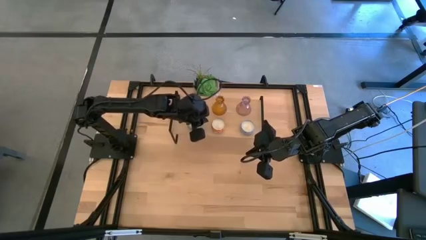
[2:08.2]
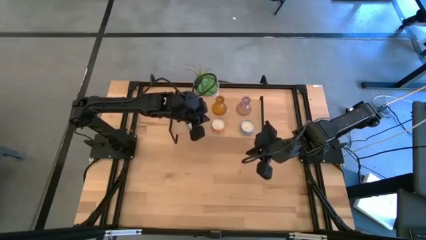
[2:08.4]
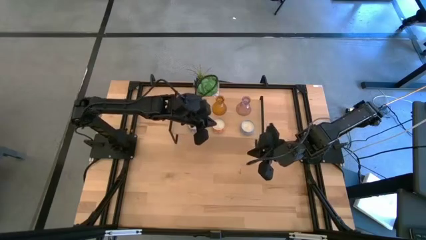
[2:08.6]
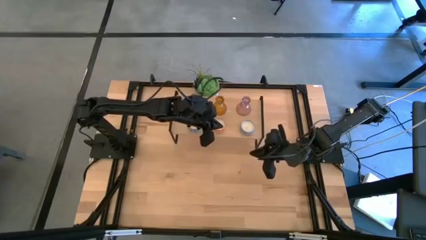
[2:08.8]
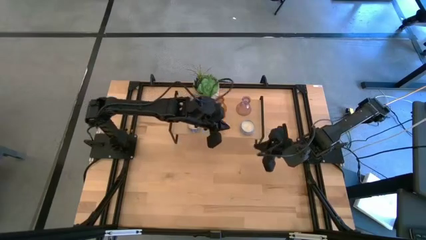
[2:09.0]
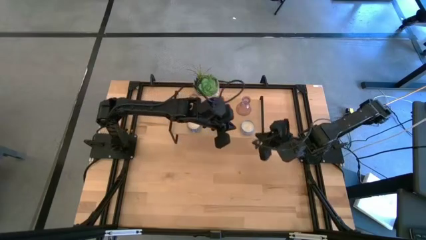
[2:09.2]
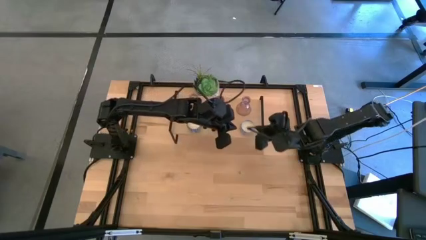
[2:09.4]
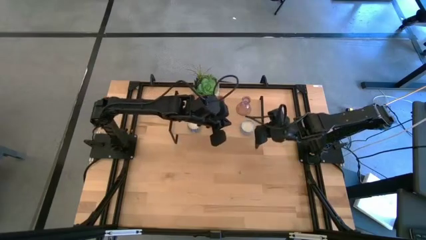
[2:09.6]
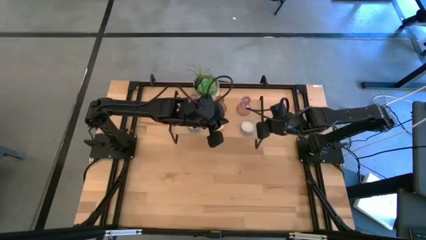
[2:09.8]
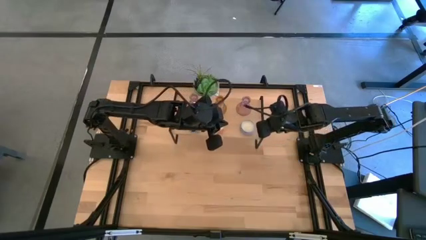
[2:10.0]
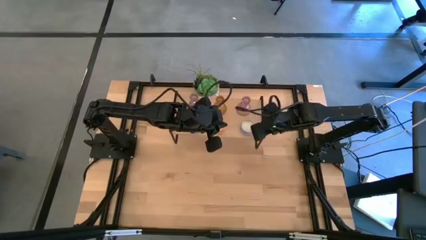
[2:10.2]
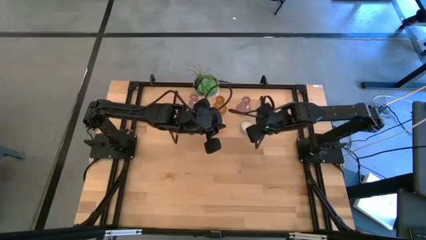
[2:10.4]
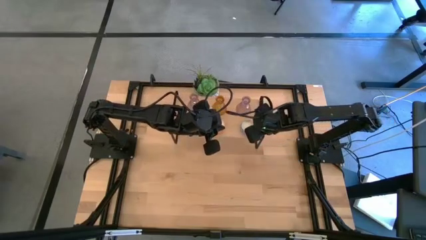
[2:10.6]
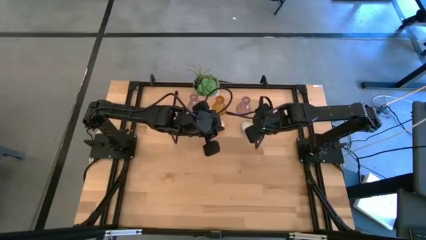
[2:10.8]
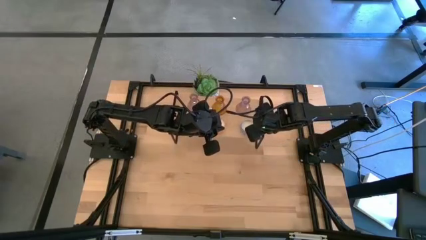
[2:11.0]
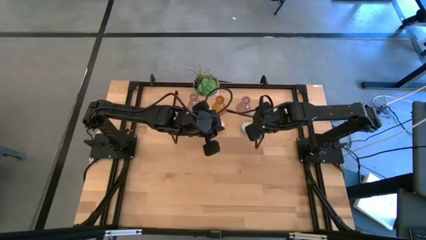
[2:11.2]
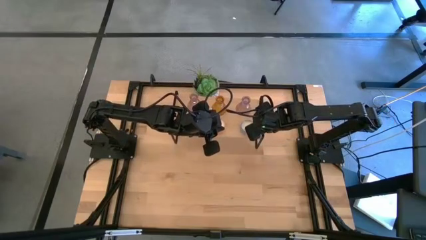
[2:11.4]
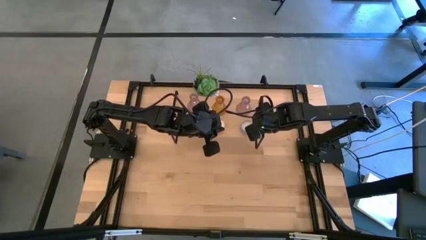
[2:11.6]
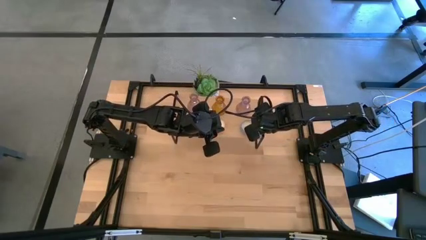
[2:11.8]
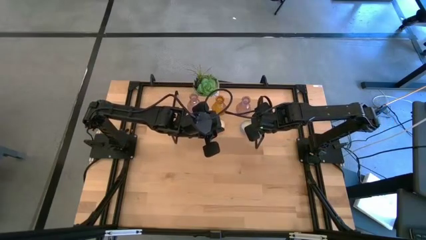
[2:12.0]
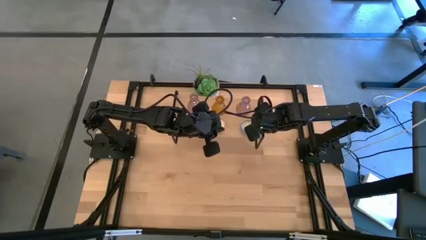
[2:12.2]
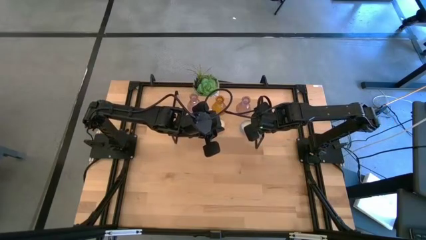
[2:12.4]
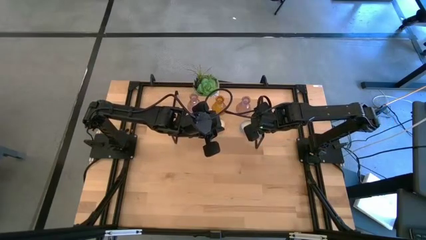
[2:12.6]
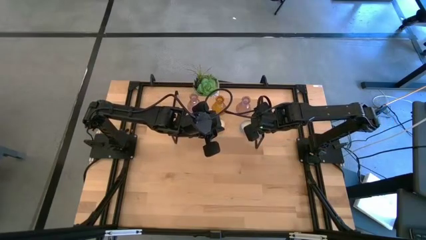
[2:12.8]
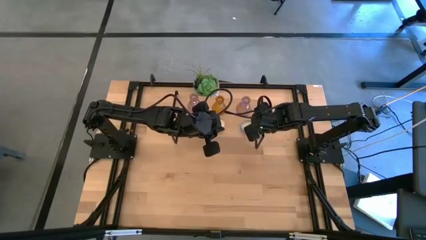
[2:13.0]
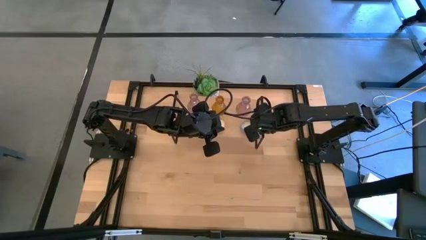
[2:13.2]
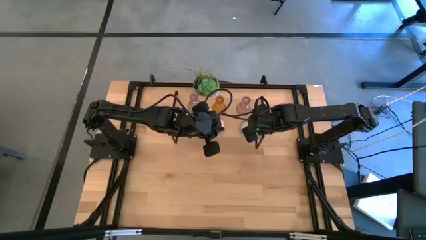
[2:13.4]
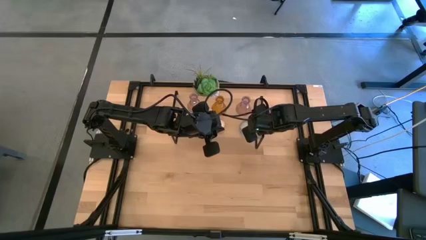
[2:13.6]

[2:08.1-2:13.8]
Task: Pick & Place candle stick holders
Adjust the right blue candle on the shelf

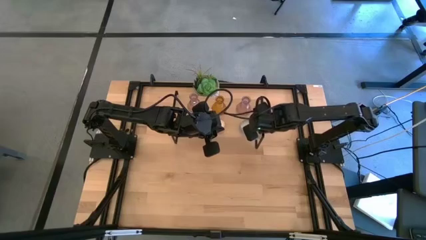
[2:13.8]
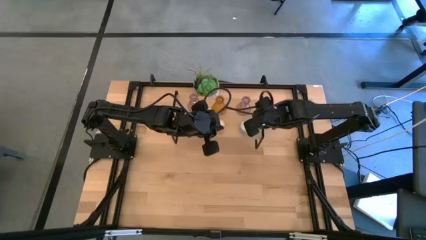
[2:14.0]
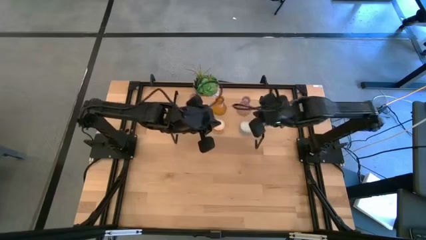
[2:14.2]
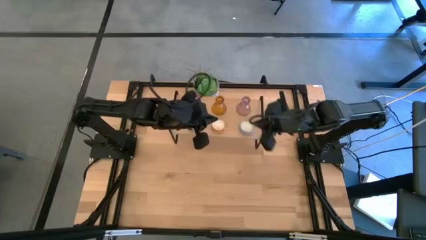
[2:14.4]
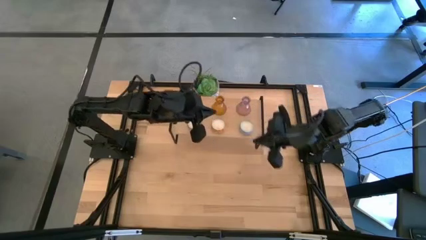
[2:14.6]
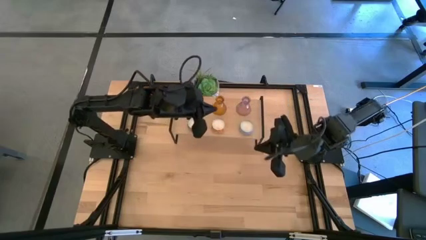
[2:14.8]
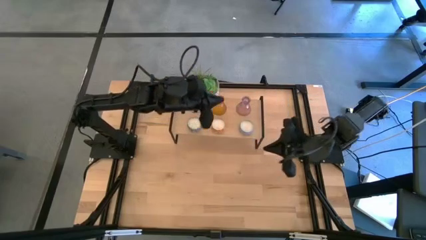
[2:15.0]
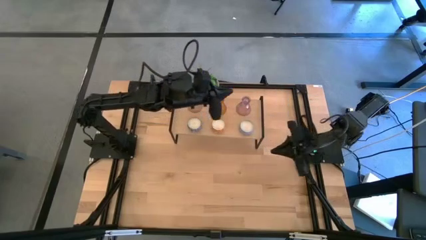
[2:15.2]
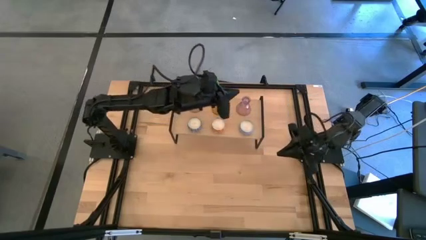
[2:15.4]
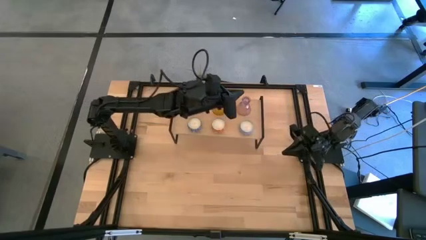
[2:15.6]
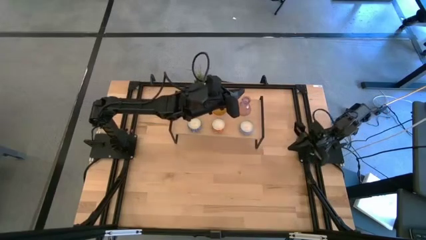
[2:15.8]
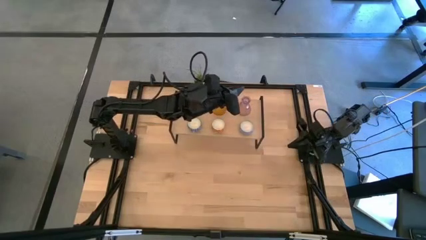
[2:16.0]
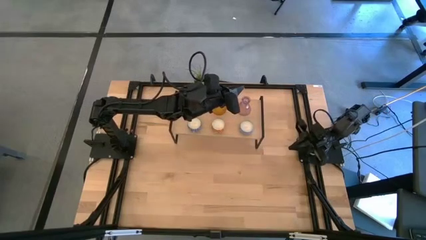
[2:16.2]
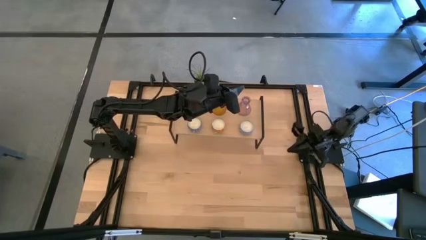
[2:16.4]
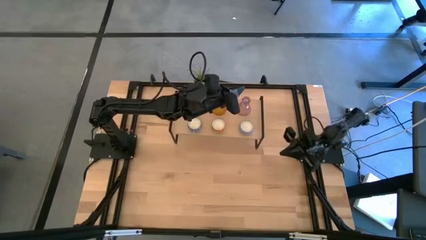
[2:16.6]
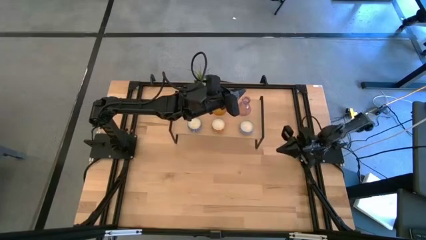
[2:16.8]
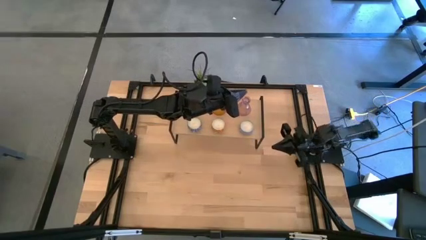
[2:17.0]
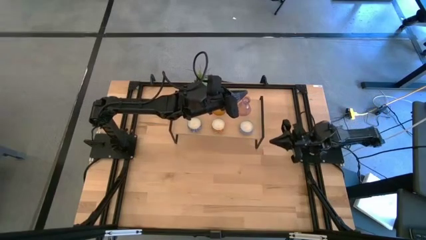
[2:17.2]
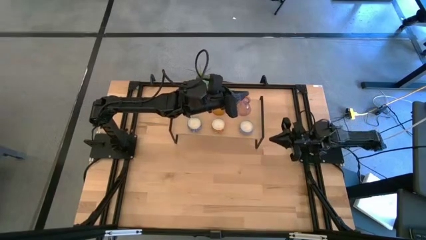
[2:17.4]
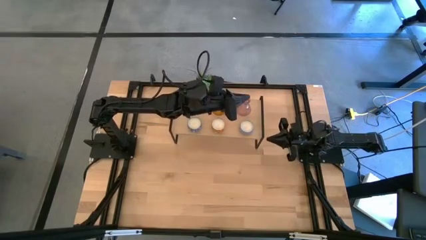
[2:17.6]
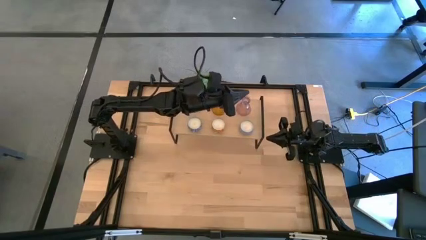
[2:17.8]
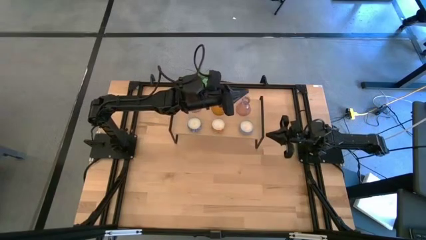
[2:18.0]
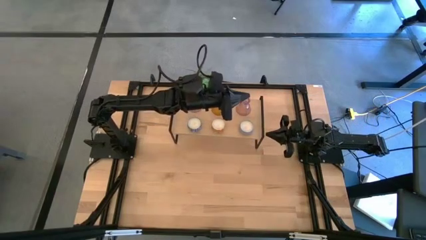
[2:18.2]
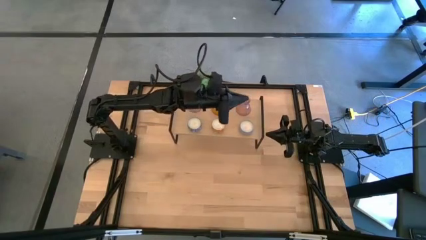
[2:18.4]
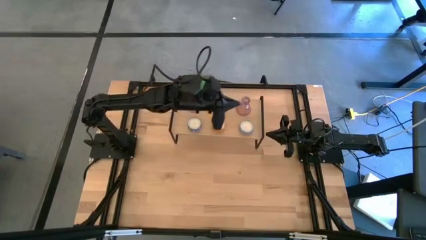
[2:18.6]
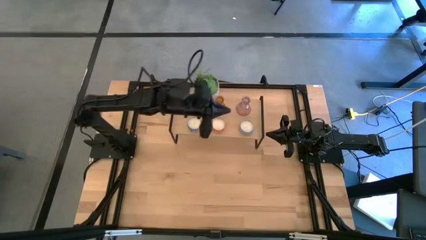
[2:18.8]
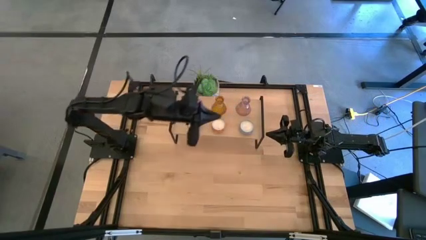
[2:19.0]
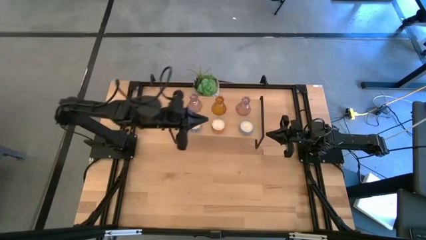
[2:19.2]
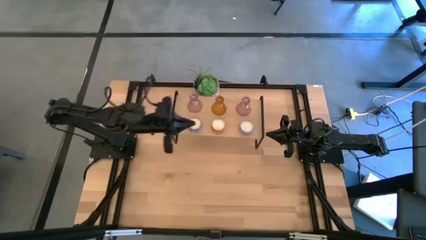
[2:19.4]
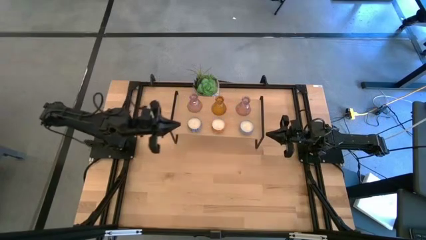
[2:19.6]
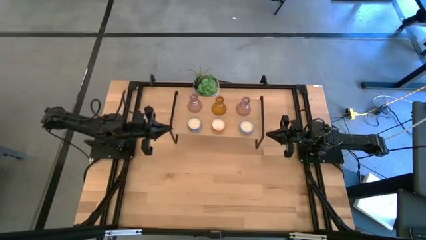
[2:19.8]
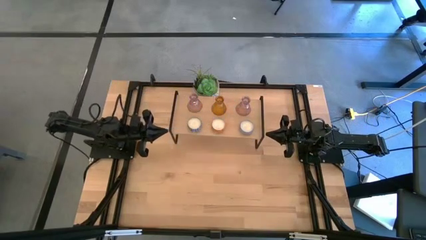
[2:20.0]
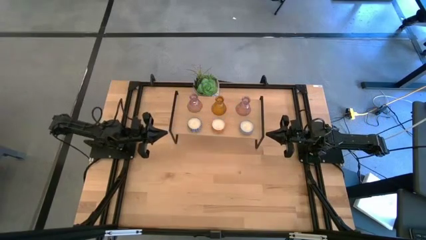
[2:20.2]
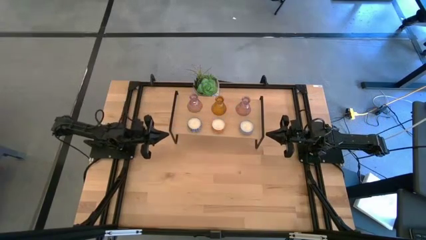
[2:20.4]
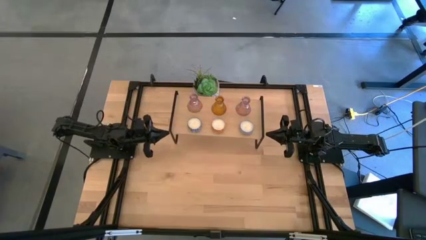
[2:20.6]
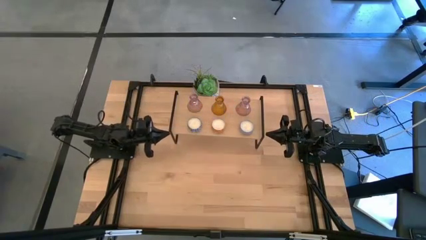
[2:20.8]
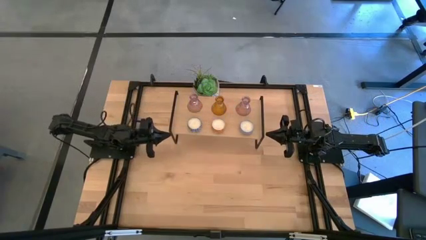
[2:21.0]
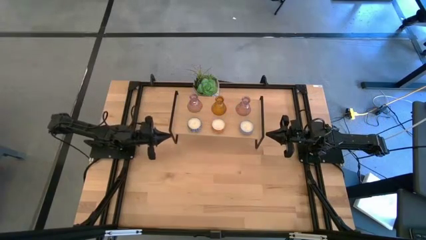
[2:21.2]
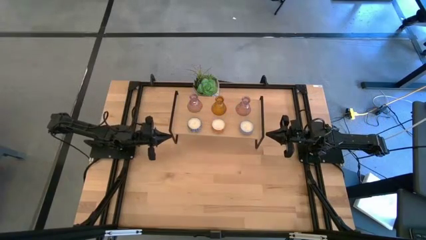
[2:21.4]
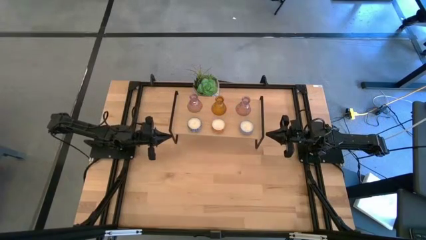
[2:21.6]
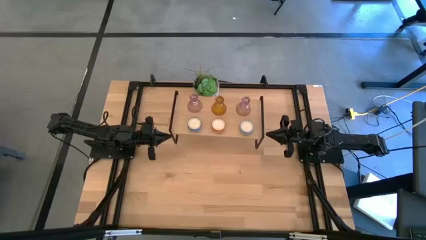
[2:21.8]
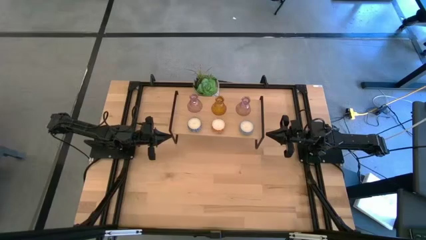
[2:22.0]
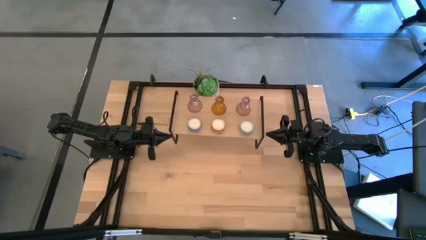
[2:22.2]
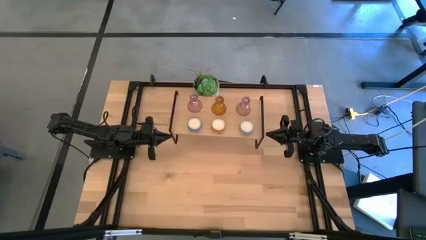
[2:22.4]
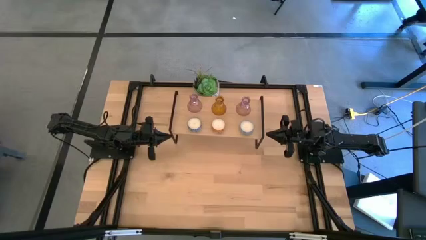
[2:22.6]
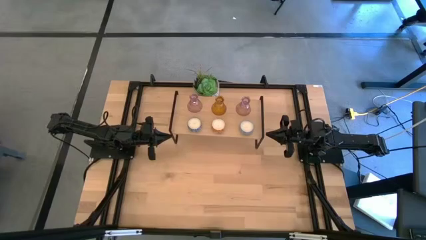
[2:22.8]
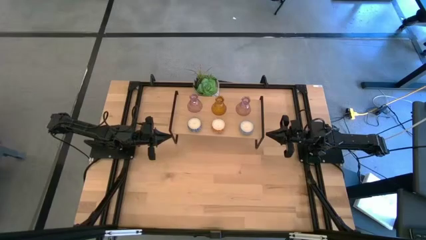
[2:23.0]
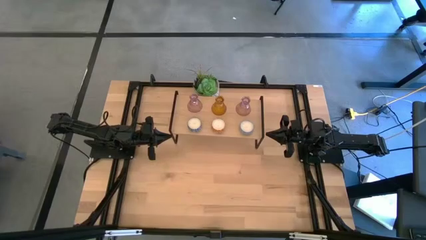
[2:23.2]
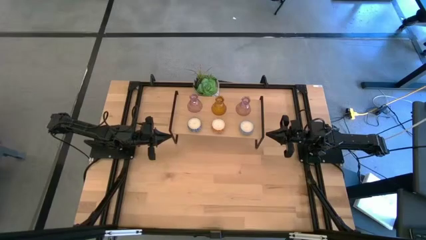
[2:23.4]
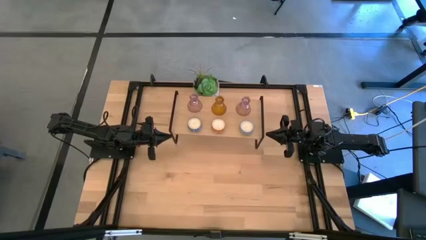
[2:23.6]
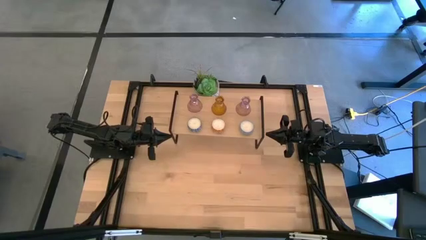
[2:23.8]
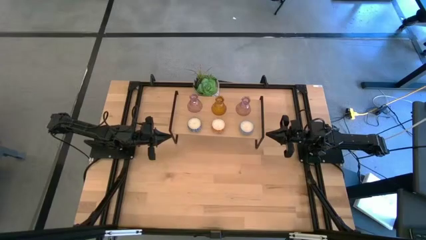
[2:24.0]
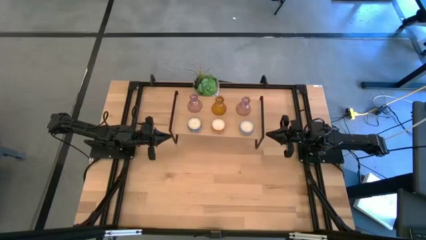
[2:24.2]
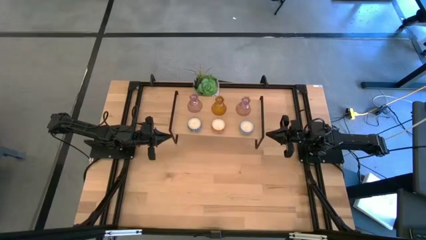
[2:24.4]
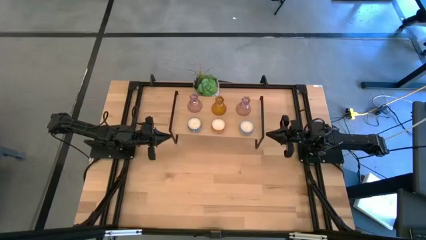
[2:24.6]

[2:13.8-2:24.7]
Return to Home Position
